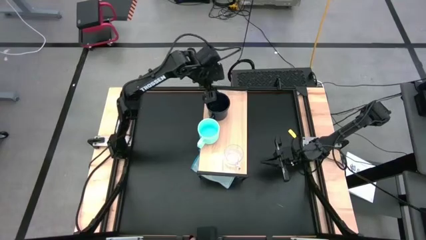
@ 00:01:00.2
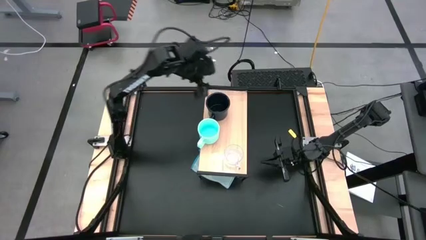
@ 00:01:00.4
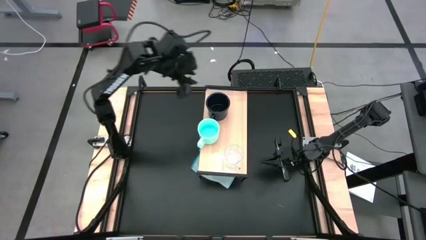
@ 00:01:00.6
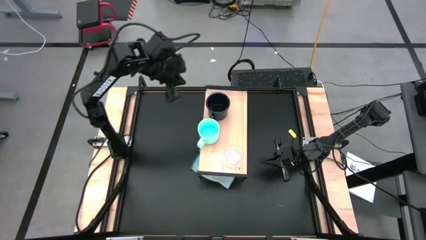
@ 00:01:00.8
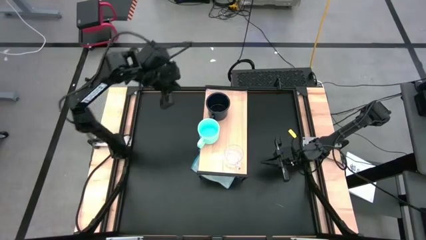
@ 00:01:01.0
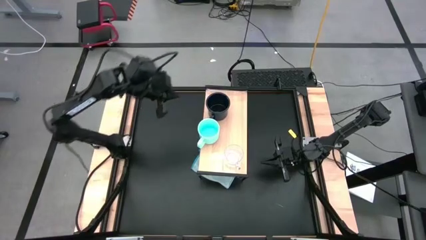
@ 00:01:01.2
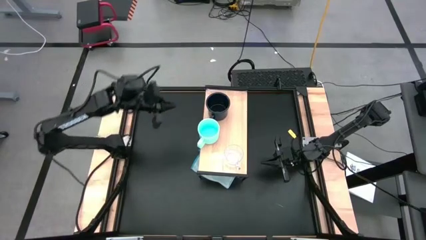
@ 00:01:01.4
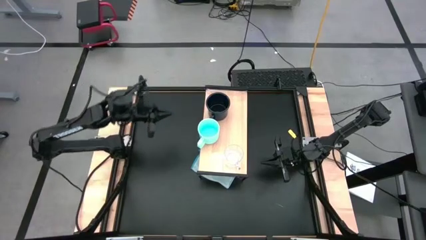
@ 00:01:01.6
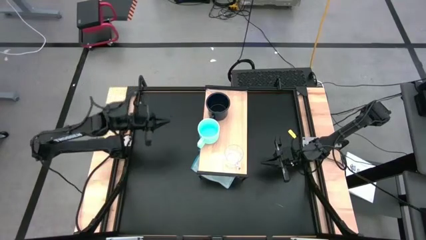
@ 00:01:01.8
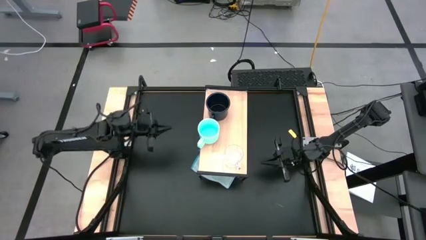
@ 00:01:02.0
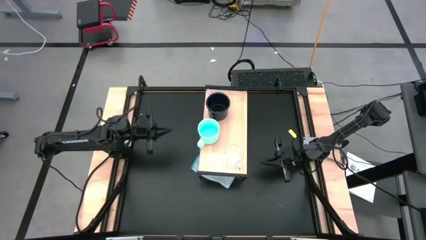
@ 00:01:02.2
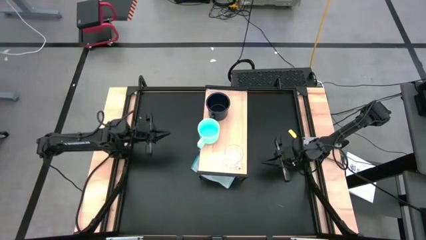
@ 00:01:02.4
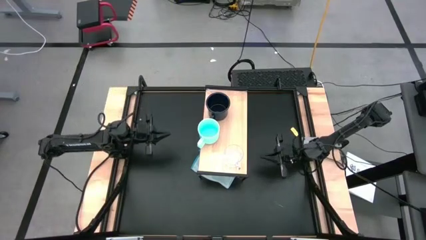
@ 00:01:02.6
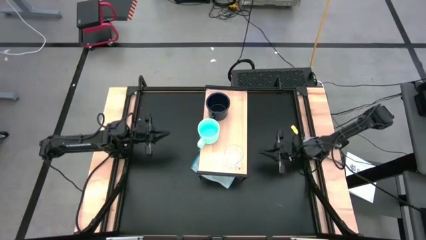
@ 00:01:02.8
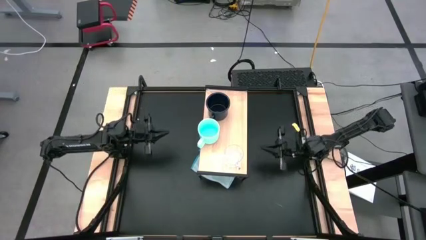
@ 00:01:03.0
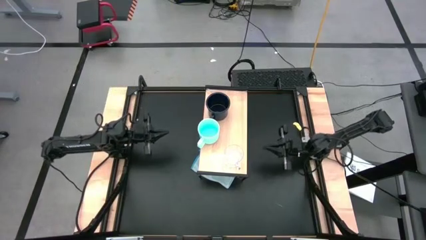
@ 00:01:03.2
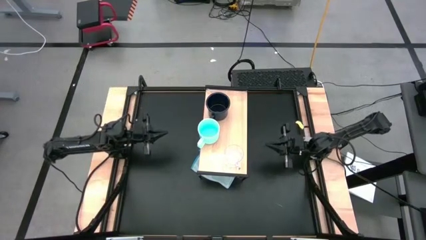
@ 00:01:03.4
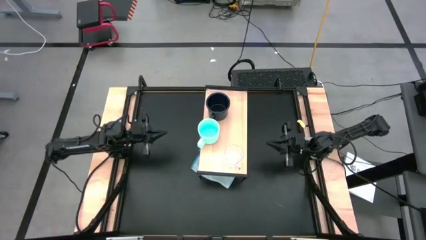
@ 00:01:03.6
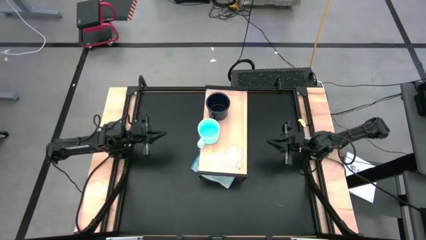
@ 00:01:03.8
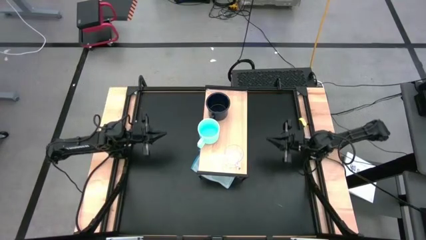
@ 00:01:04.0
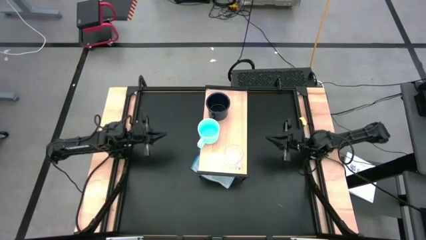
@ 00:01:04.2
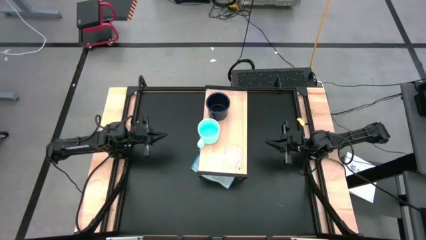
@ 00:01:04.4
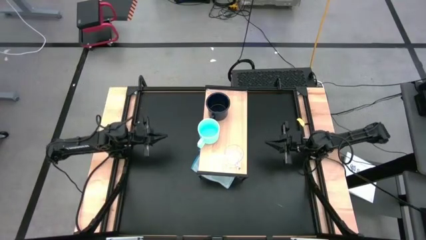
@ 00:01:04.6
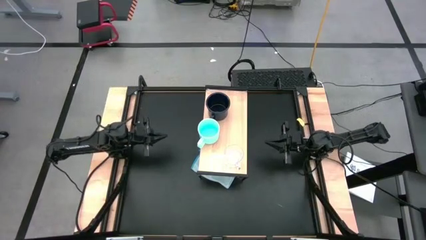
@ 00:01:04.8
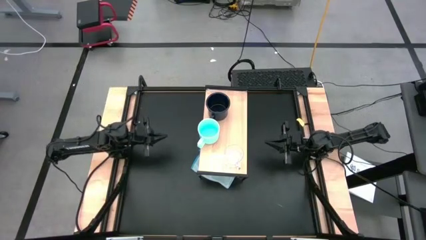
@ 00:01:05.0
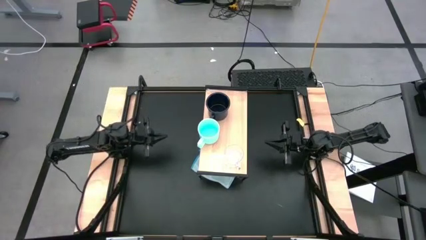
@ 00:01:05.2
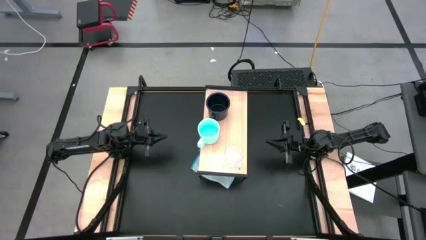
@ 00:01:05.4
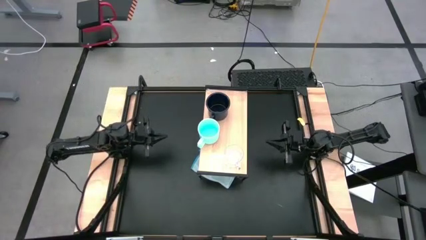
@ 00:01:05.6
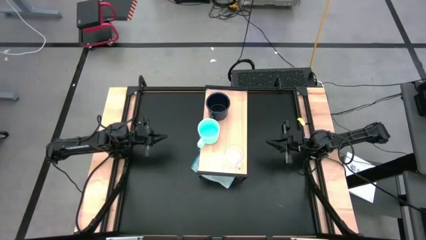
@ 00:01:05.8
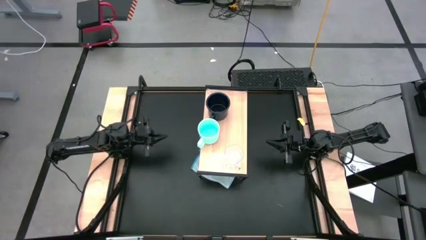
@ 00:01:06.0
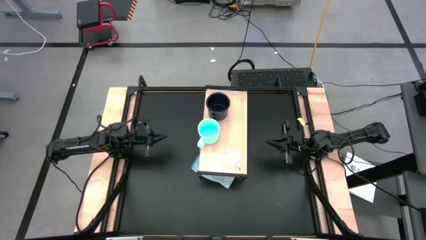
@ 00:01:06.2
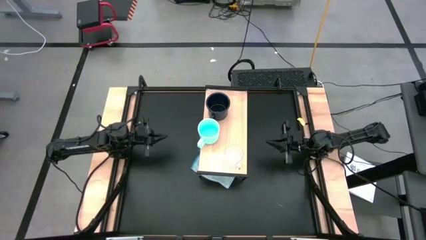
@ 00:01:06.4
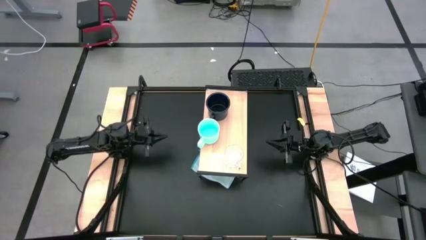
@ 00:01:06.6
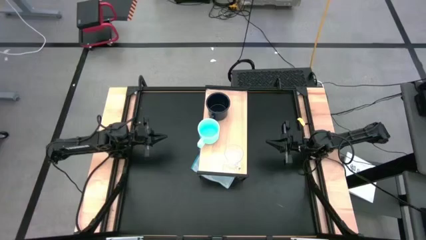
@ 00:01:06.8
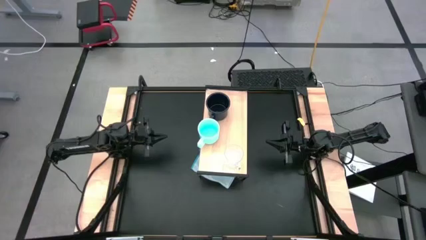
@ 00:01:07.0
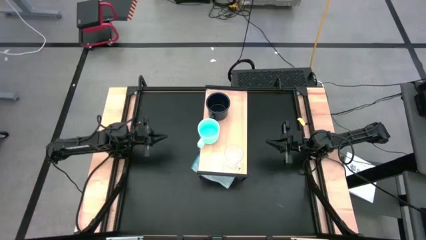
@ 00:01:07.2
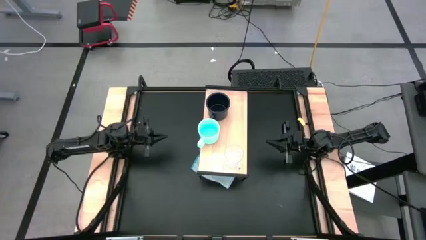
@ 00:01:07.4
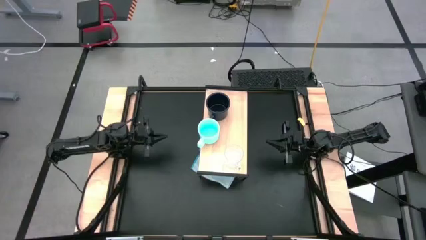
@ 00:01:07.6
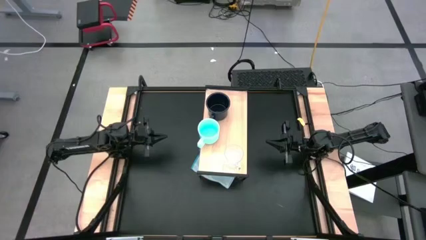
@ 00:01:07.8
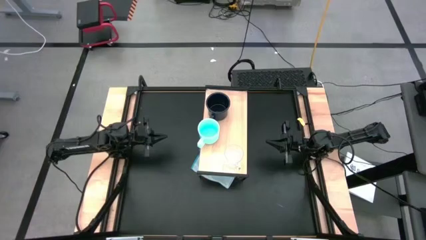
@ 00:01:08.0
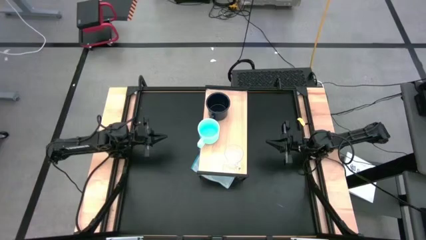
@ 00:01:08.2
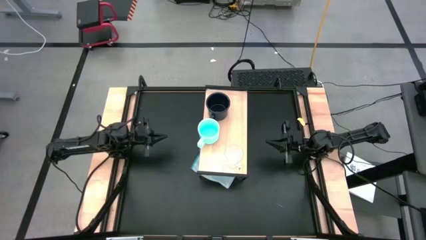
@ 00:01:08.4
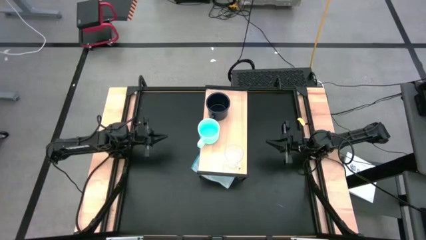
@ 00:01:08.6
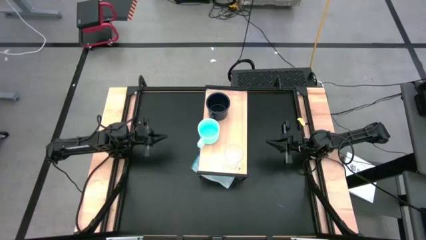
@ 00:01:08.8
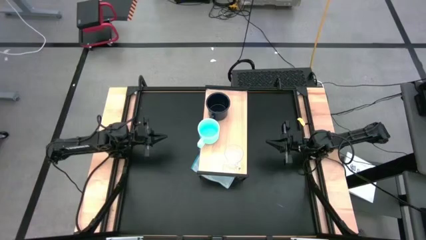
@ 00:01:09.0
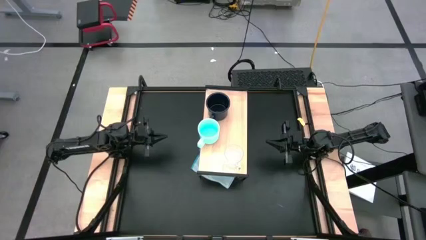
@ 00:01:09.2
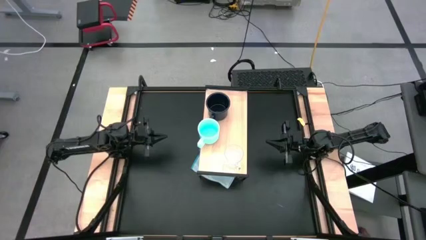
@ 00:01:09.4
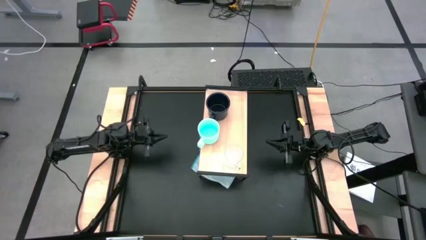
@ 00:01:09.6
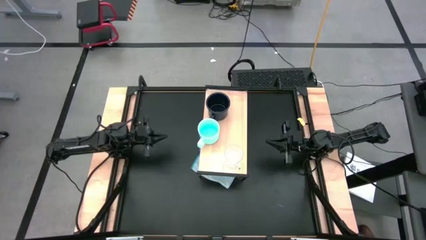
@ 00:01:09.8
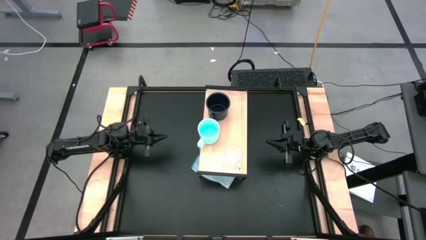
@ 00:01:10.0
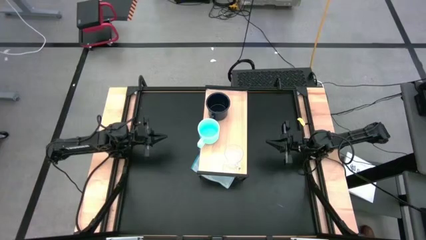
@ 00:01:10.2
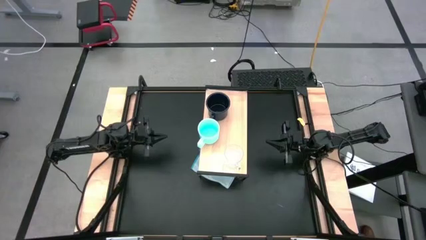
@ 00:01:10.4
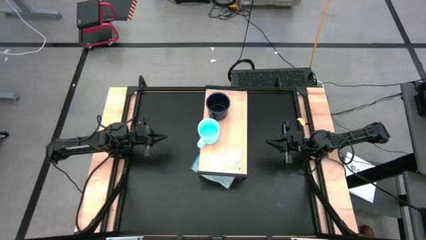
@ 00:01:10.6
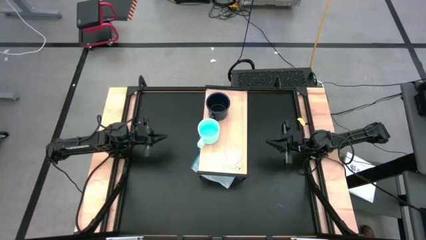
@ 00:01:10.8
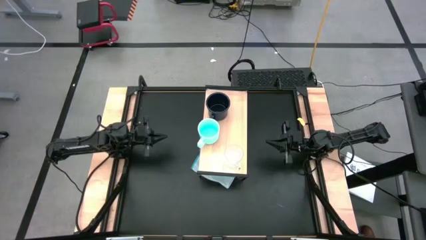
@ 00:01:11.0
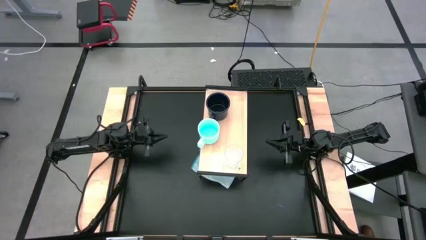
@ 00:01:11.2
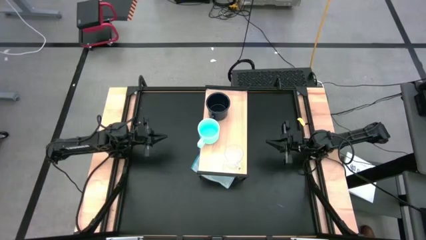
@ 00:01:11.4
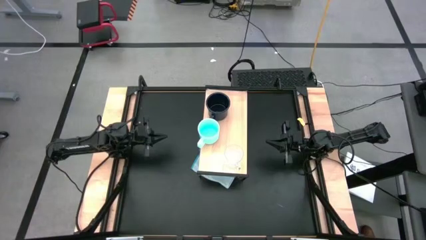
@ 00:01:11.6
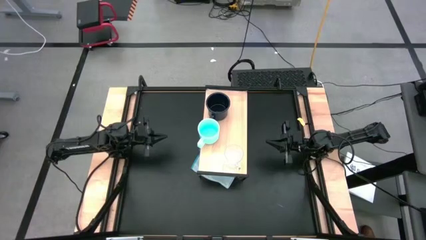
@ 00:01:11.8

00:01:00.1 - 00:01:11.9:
Task: Stack small to large cups/mugs on shelf
Return to Home Position
